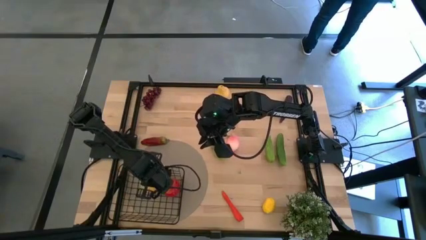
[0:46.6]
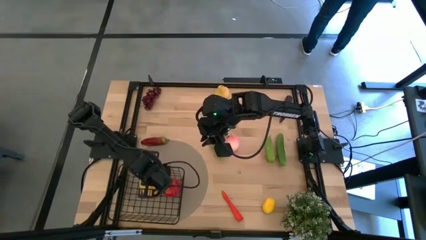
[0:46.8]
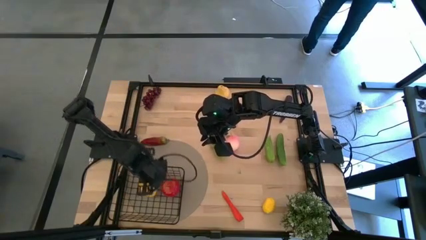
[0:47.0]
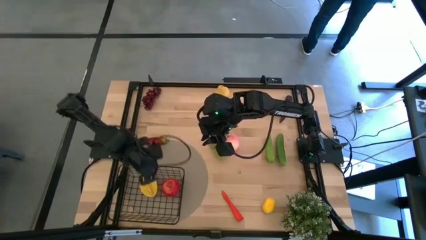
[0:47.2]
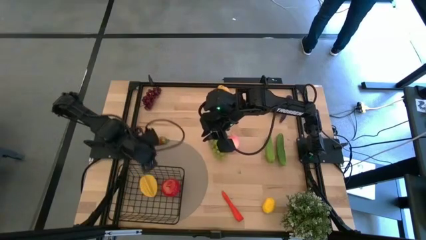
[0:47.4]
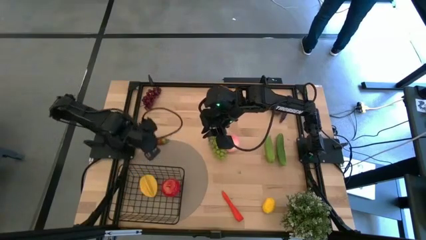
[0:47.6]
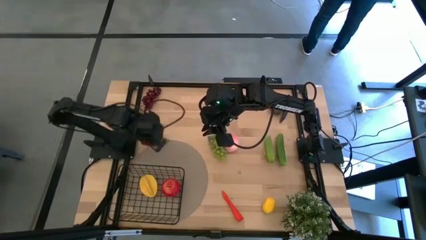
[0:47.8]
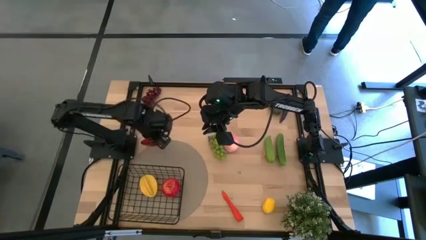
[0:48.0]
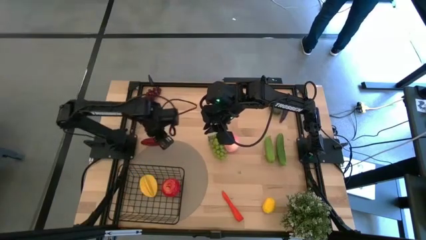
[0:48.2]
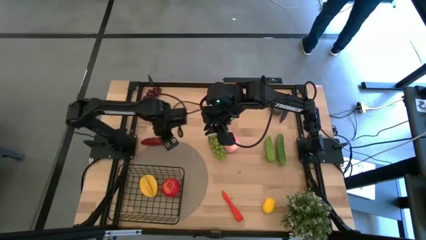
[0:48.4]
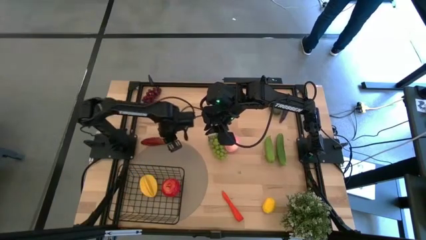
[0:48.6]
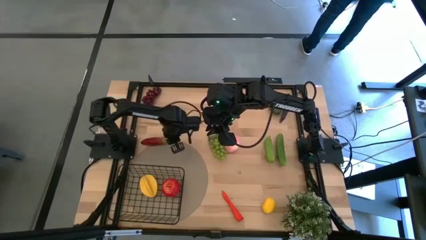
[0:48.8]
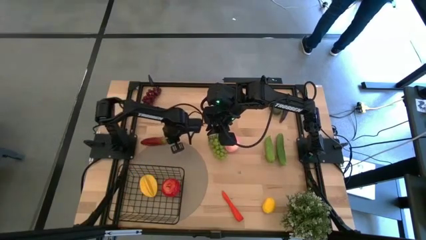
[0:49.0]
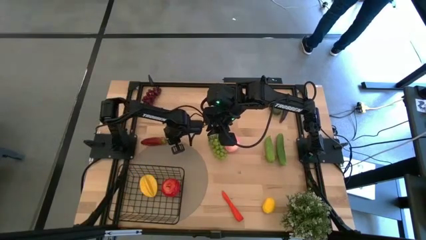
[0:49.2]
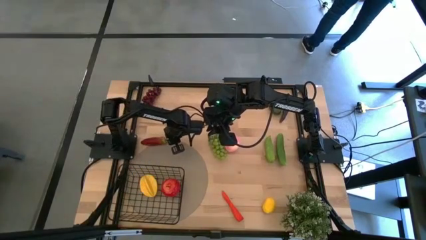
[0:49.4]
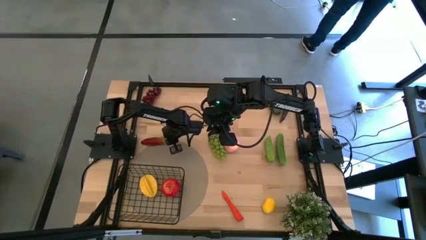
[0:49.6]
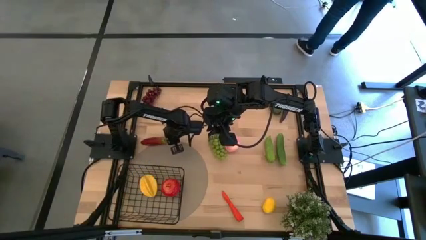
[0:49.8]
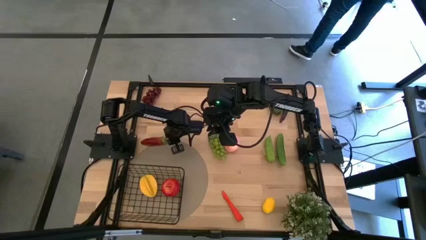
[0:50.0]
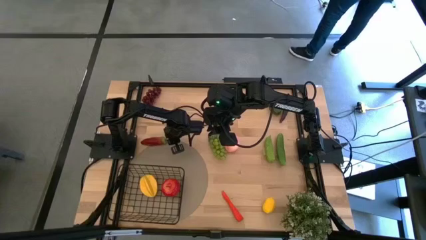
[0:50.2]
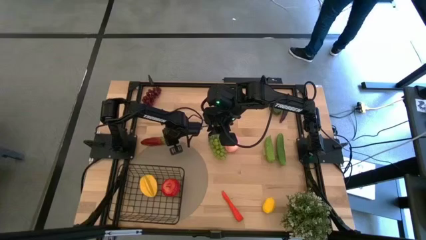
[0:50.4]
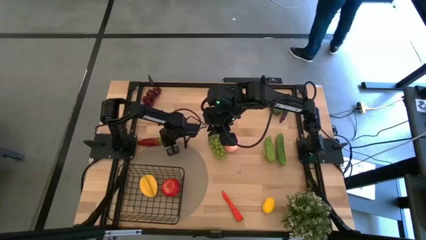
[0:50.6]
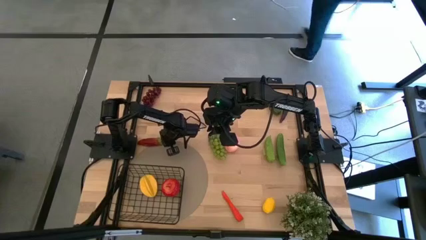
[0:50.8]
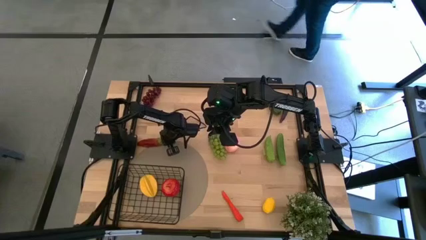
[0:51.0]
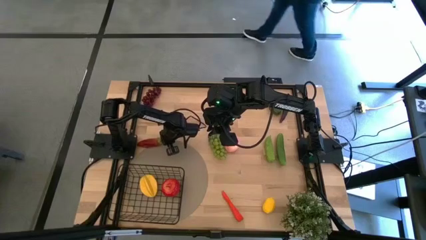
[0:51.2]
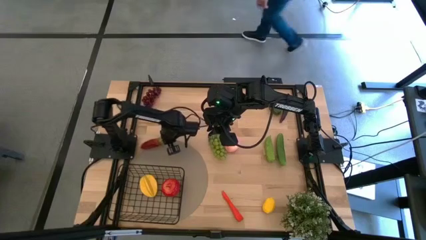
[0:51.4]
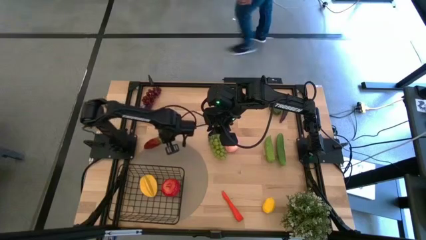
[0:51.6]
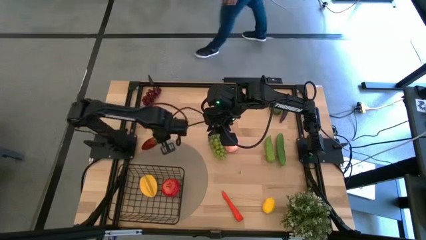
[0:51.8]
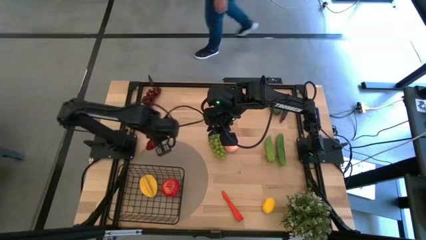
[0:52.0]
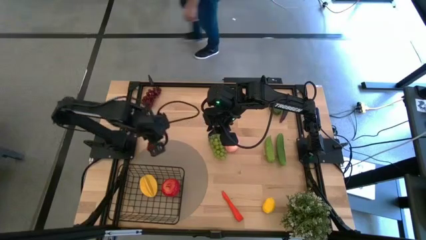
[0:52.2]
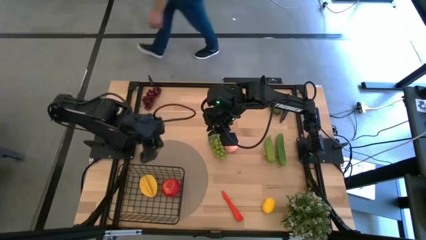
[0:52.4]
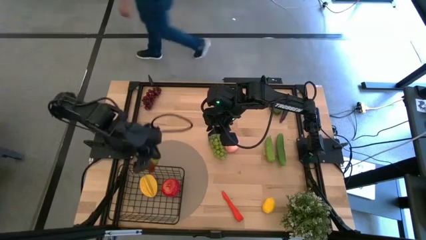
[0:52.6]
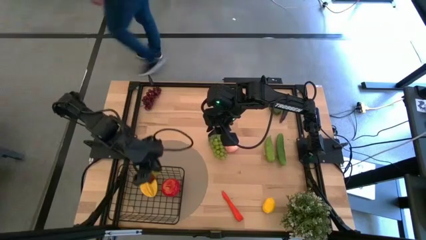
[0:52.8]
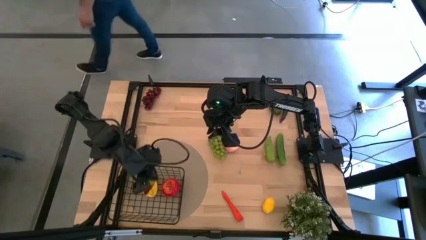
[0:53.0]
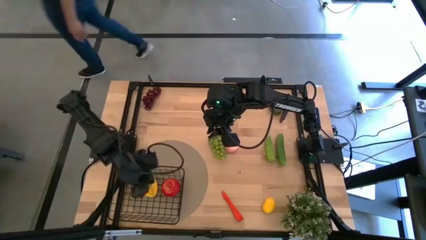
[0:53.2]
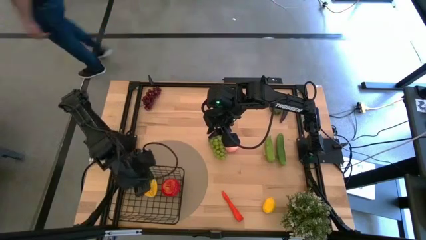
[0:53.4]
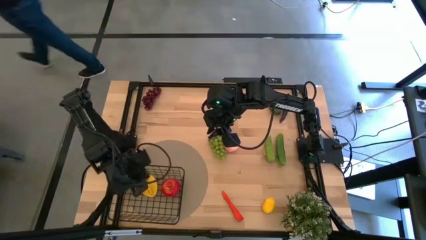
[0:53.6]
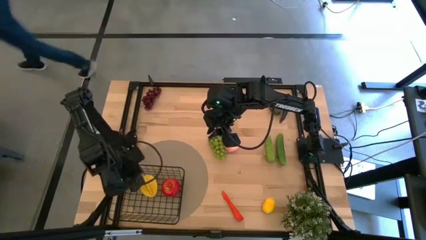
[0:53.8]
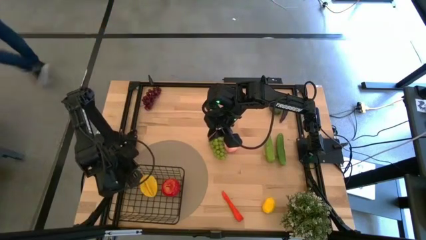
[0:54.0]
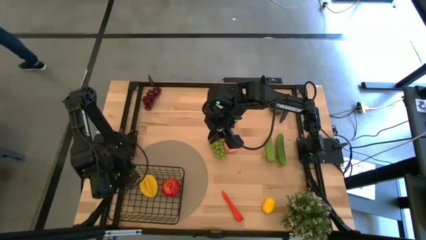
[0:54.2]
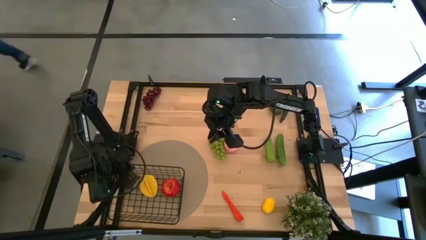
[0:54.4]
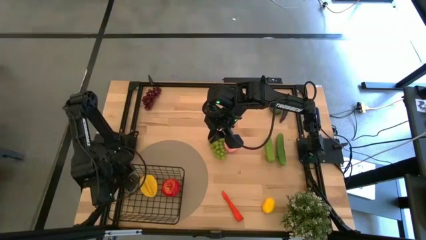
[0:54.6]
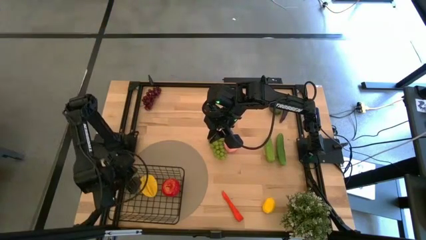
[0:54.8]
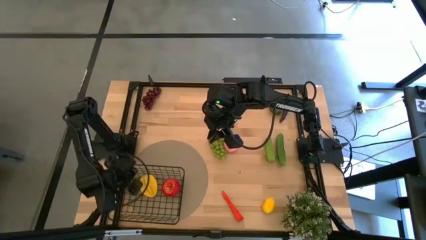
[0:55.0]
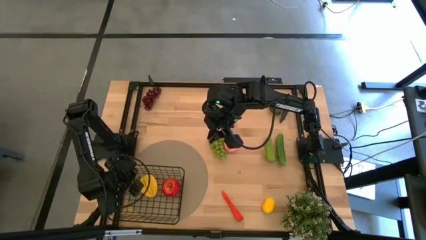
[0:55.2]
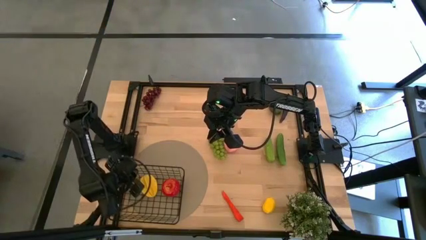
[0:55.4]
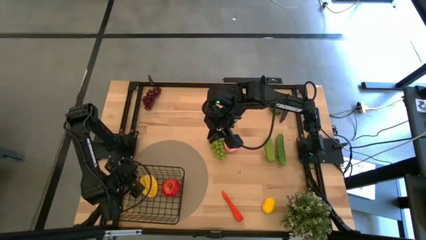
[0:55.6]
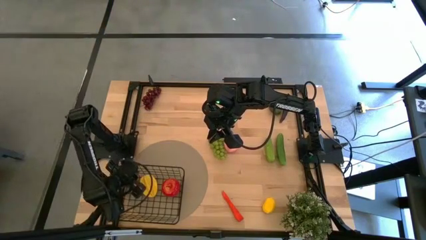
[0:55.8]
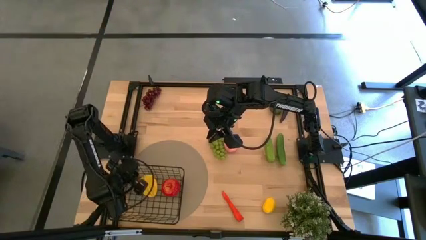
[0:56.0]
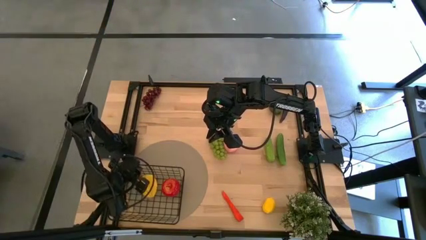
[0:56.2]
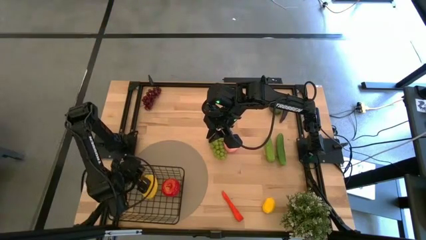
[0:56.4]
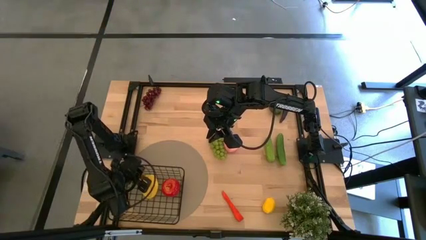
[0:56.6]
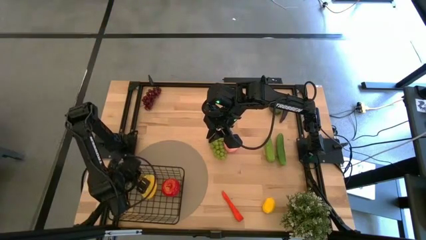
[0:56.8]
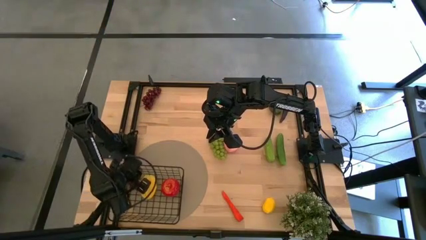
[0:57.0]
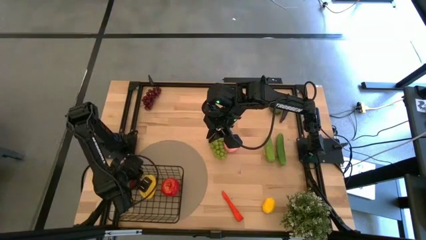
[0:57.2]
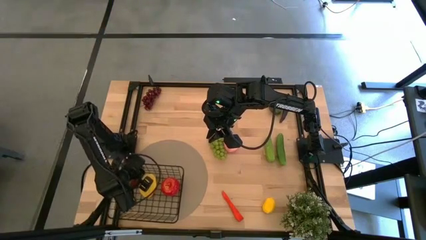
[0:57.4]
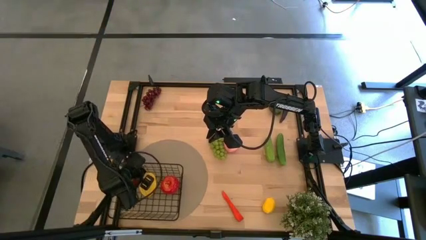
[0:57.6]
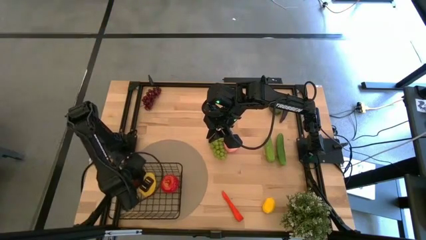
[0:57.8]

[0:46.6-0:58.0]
Task: Build produce basket
Put the red chili pepper into the wire basket

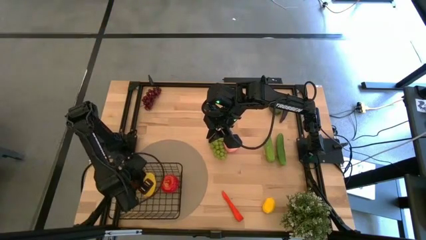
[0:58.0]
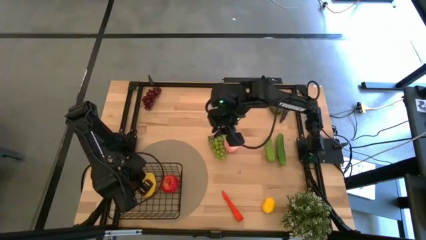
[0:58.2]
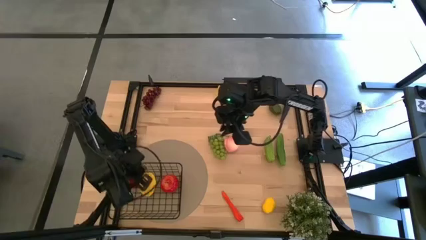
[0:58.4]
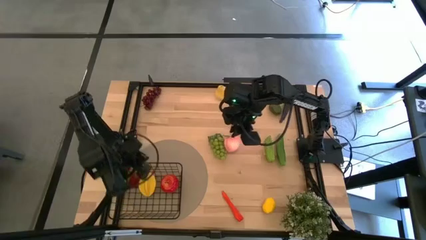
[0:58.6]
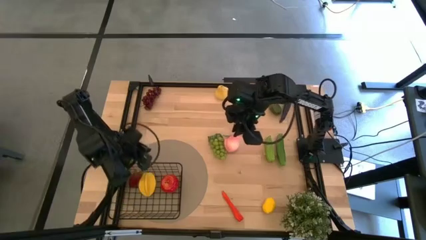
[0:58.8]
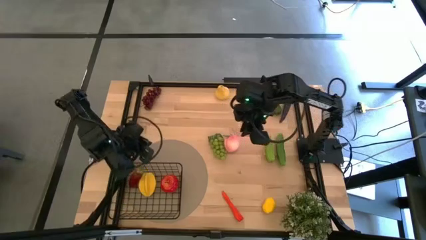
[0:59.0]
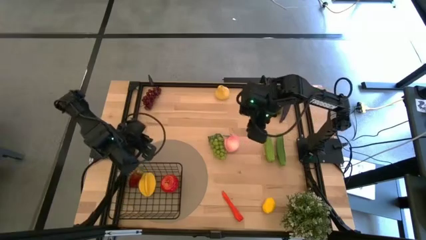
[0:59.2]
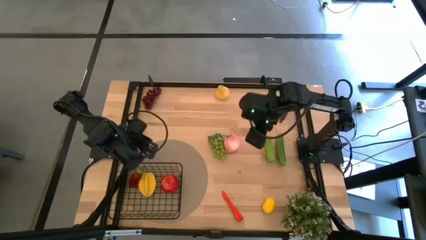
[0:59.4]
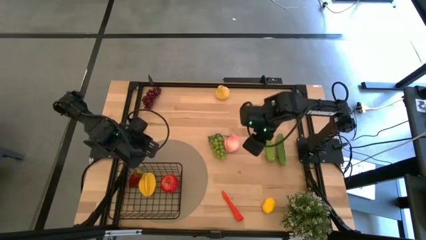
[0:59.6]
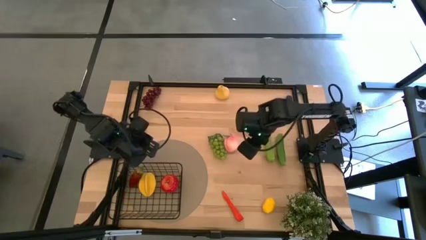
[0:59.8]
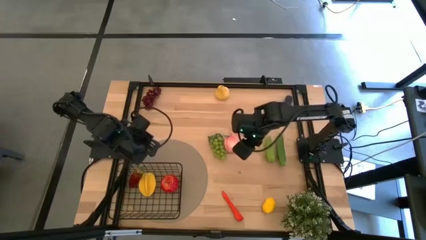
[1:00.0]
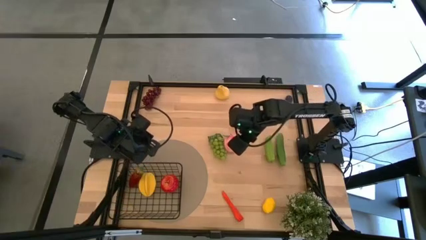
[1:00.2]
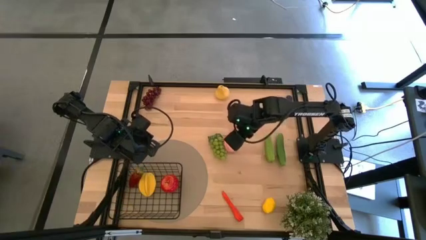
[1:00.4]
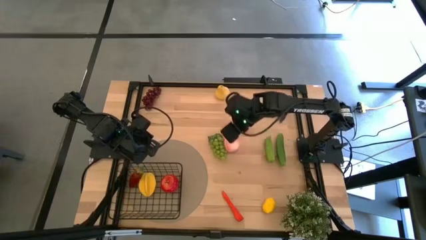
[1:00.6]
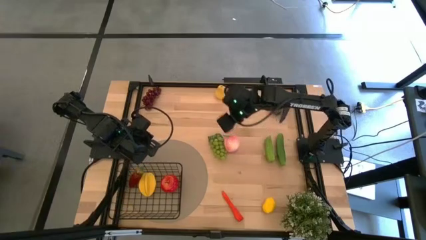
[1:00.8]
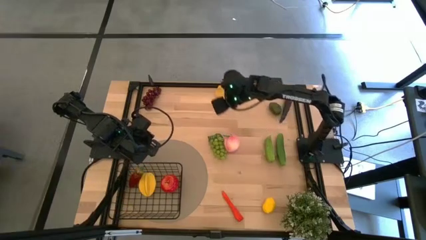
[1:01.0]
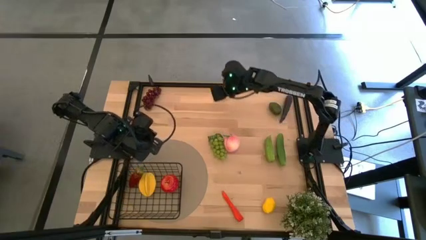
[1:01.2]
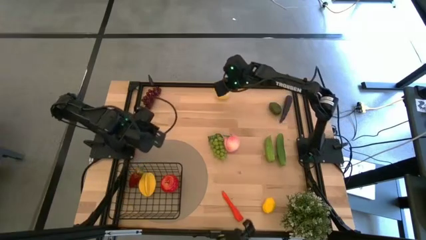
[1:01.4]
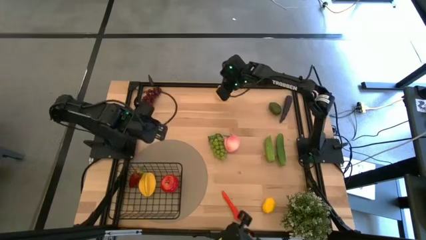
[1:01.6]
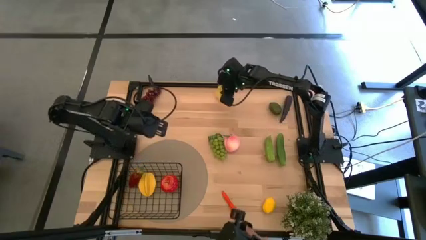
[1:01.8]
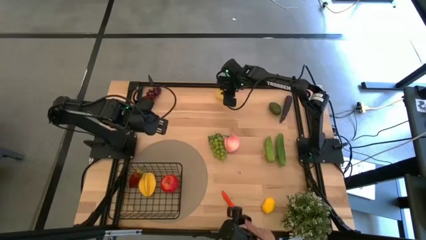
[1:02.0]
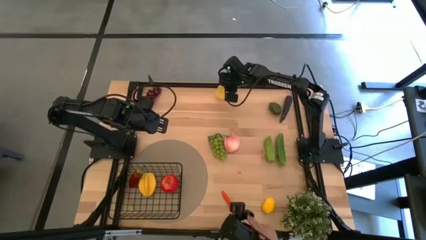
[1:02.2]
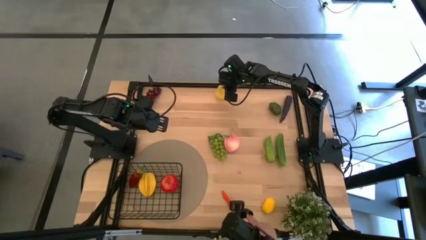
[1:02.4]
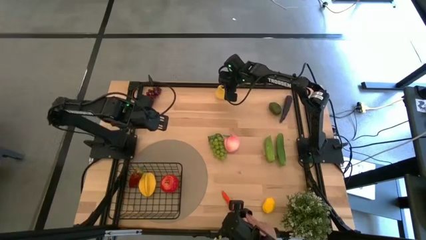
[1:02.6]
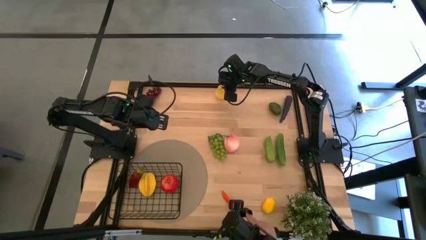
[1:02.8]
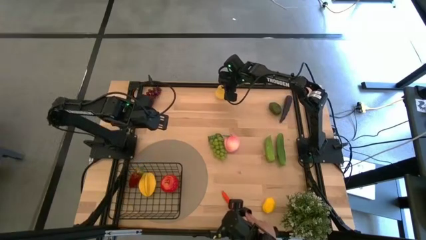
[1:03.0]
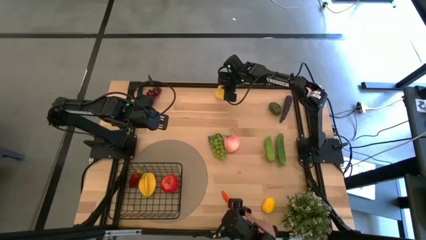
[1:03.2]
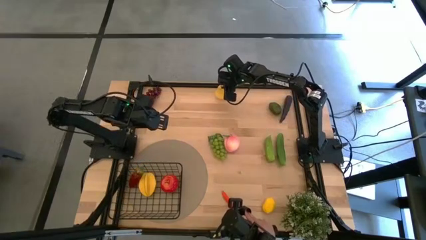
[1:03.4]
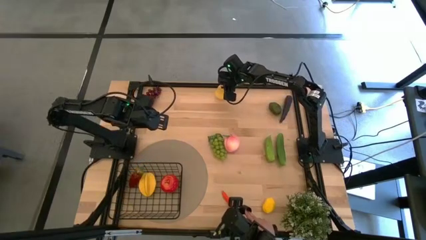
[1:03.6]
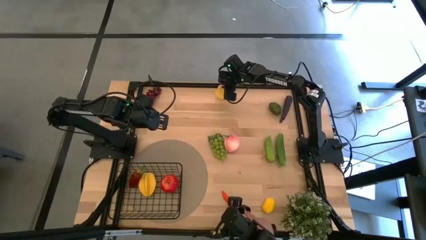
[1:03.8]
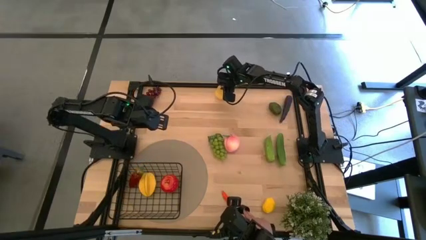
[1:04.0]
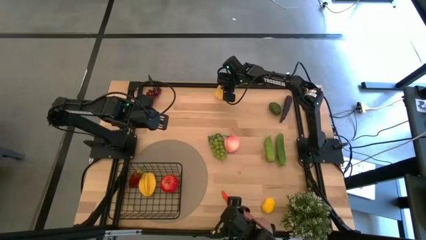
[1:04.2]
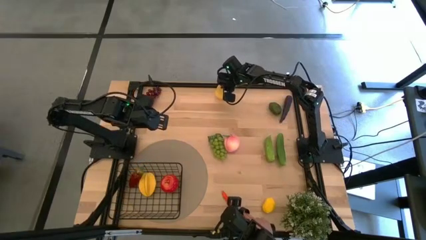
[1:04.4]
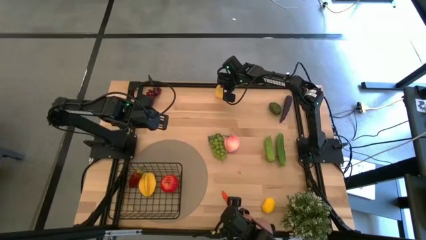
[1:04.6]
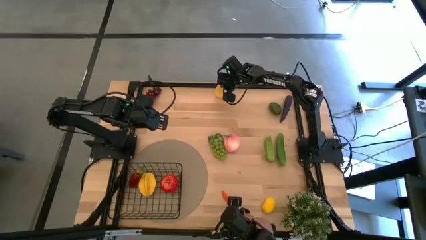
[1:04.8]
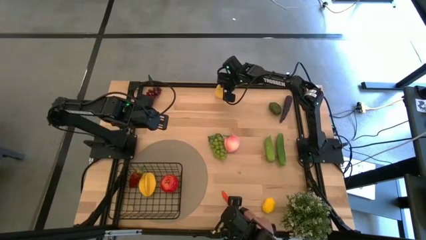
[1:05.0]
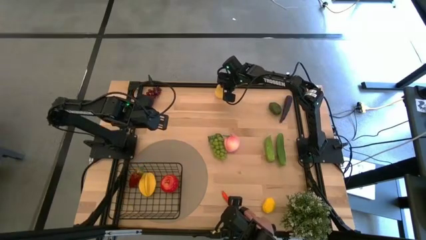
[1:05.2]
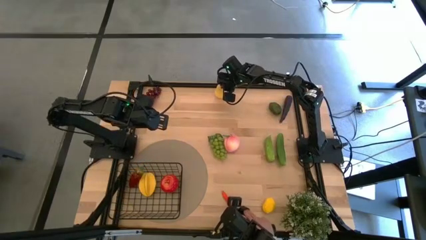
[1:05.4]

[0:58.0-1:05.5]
Put the yellow pear into wire basket
